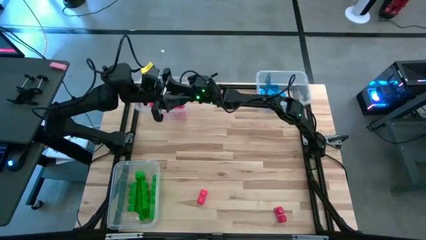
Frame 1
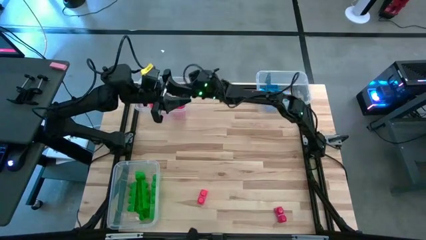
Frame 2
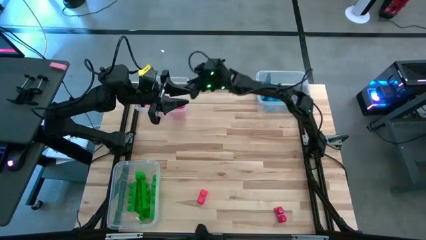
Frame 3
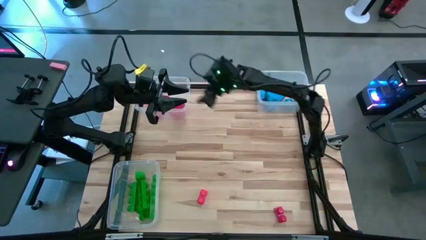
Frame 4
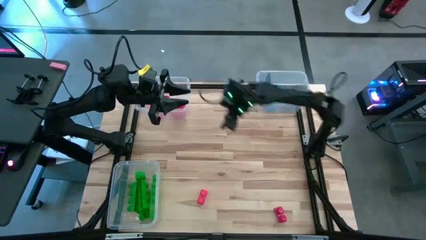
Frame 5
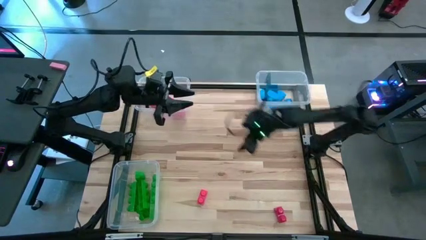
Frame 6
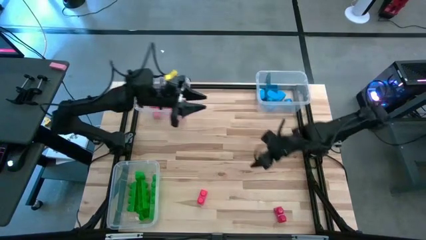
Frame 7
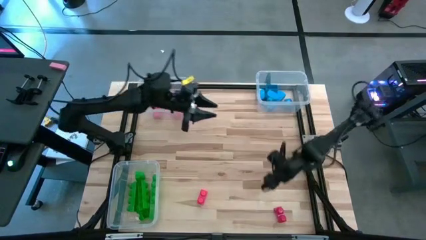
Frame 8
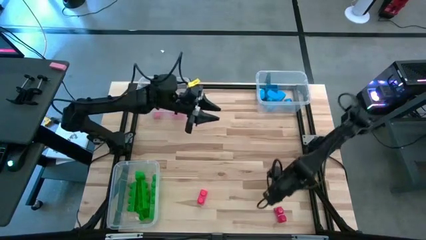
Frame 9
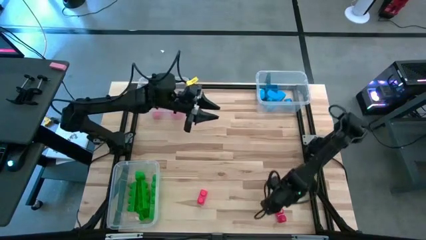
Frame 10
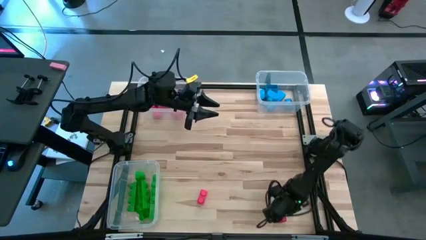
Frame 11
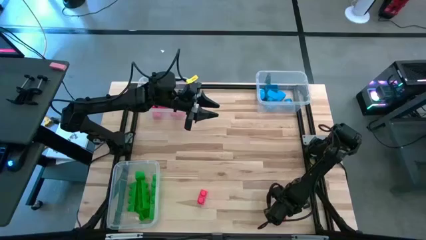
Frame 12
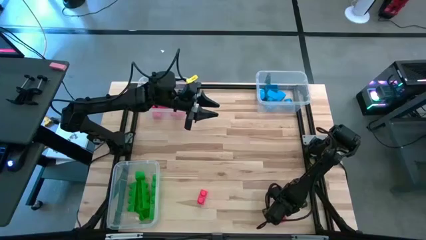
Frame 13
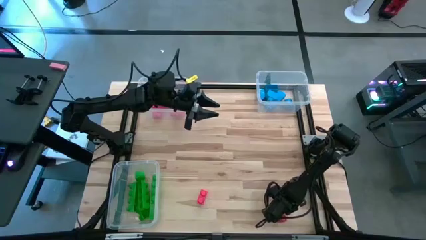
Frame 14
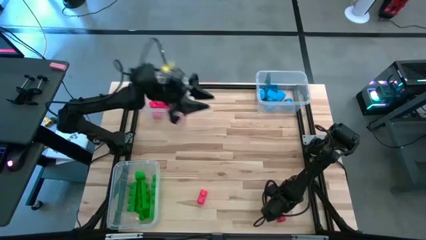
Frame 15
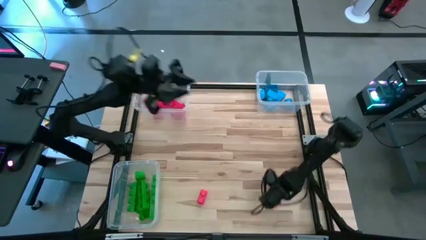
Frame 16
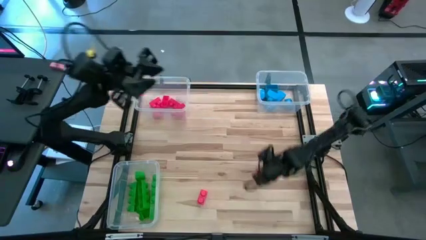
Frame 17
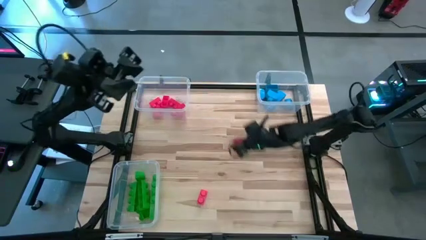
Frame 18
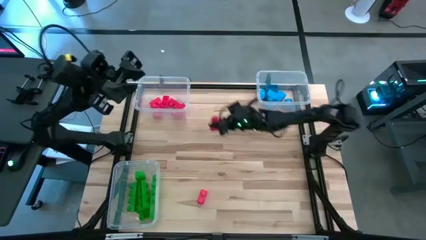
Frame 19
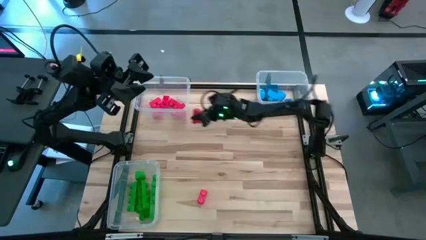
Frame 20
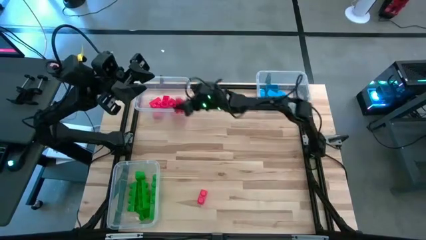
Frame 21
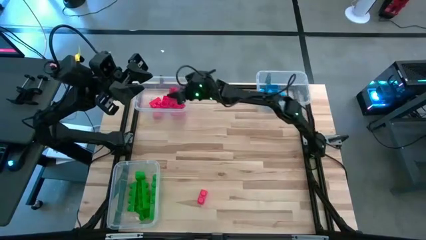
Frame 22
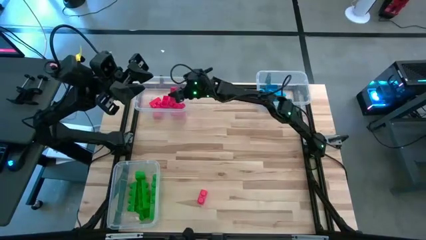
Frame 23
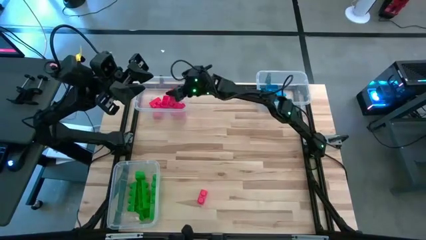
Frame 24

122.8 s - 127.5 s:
Task: Sort blocks
Put the red game piece into the top left transparent bin

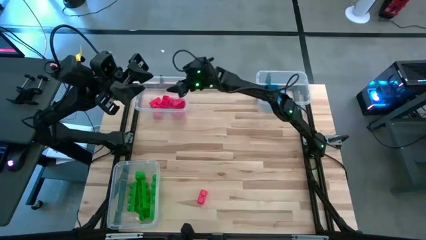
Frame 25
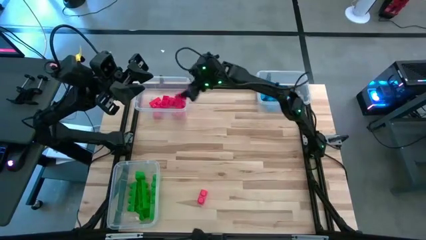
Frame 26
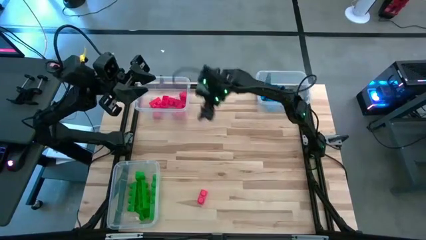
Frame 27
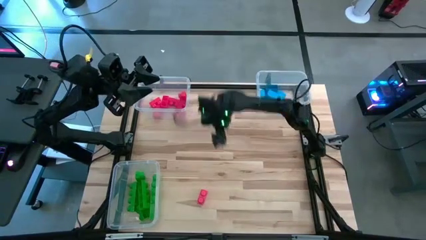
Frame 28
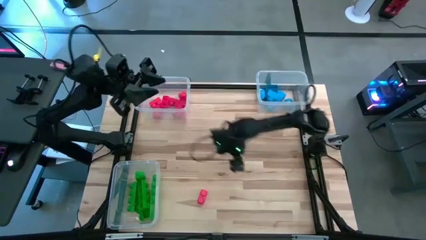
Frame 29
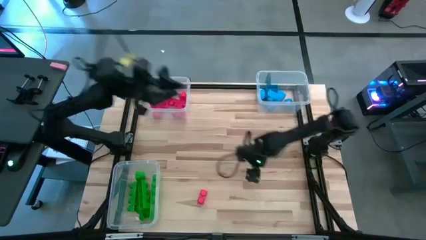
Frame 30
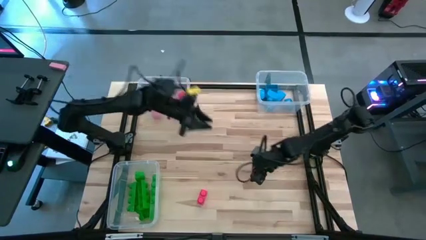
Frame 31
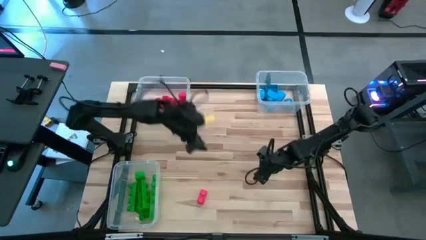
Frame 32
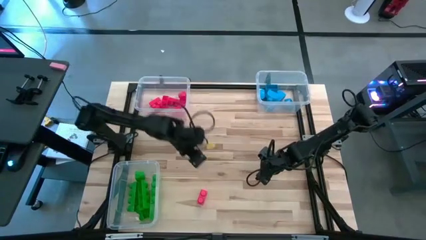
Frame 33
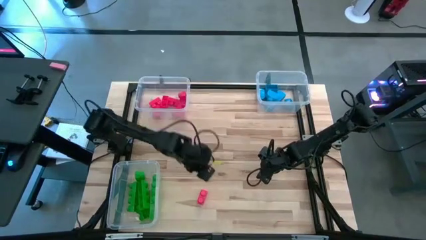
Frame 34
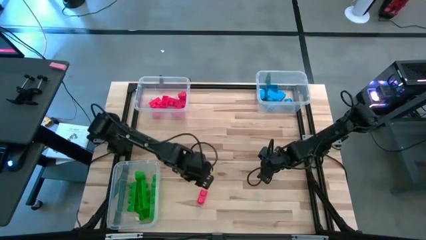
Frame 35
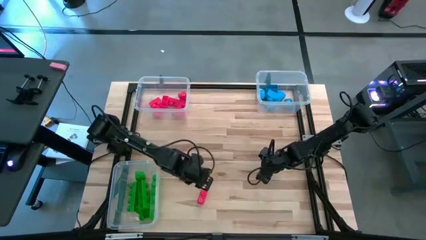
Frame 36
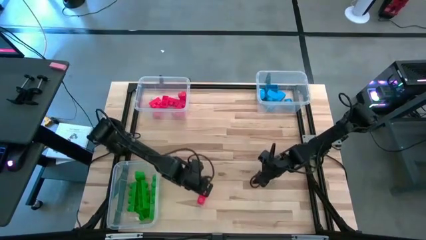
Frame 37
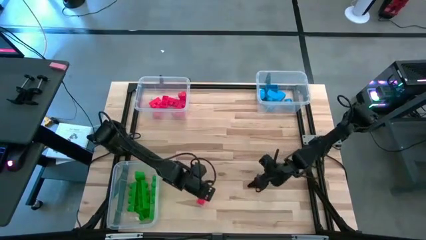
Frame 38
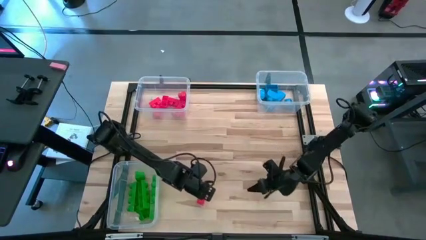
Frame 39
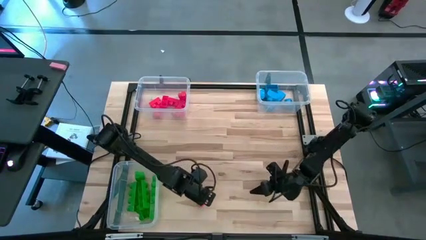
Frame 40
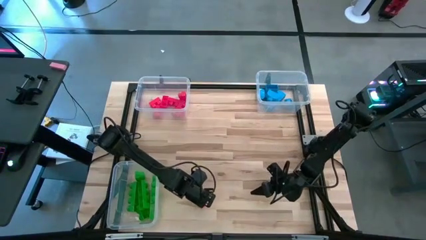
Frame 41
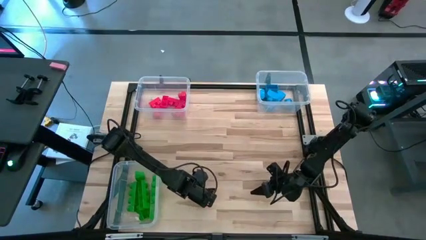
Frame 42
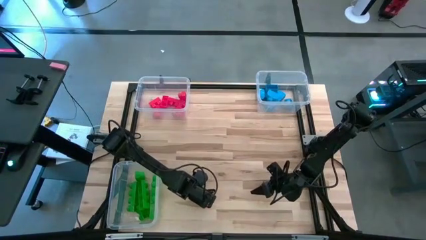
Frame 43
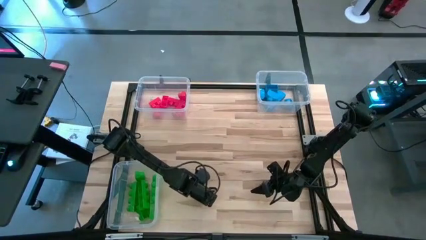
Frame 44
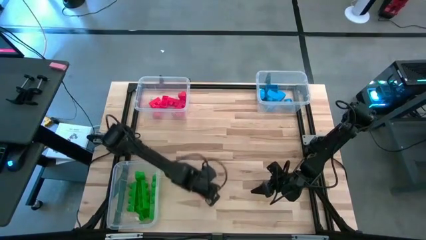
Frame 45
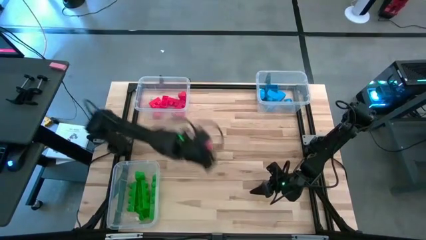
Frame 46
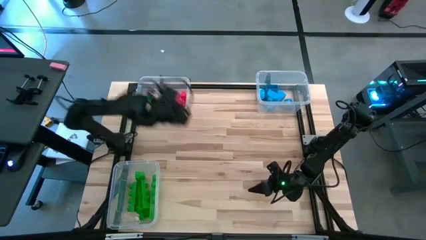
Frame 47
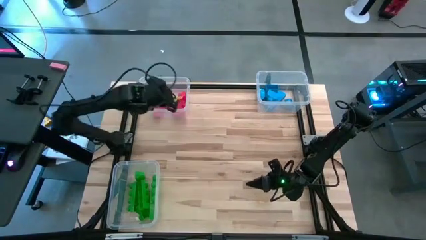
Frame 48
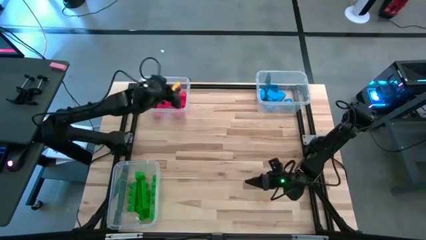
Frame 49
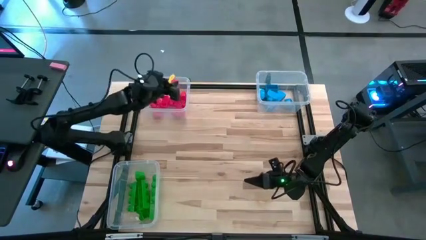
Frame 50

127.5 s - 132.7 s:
Put the red game piece into the top left transparent bin

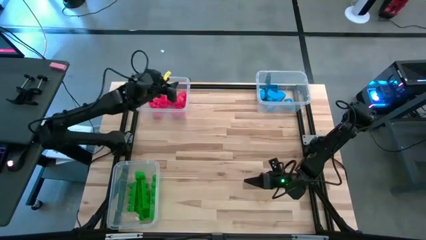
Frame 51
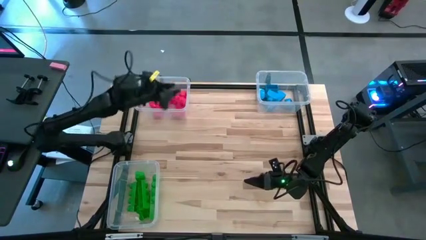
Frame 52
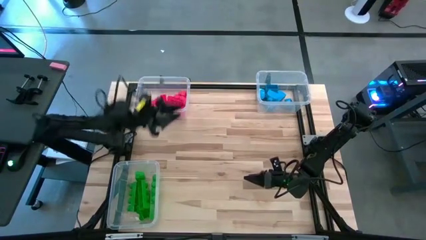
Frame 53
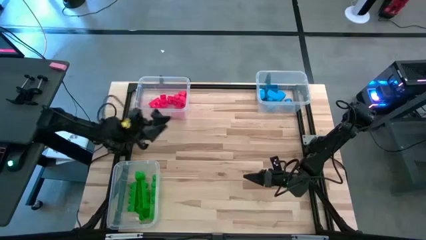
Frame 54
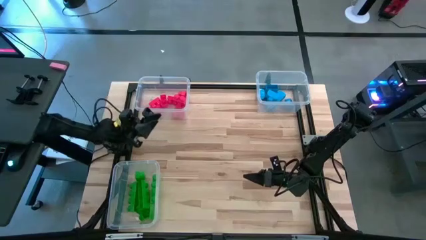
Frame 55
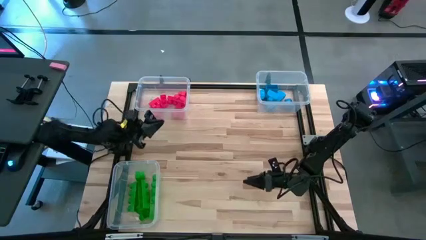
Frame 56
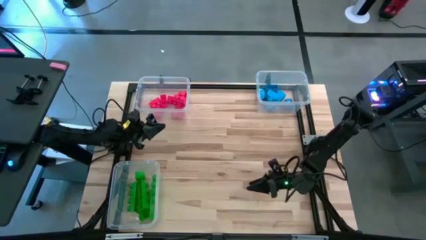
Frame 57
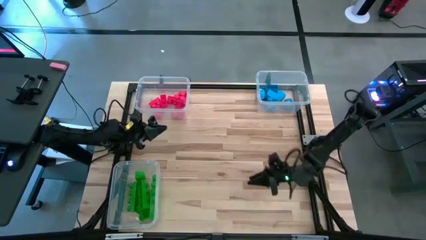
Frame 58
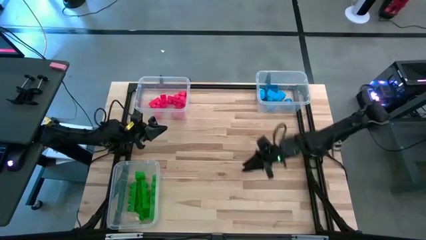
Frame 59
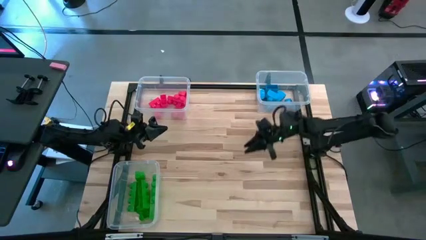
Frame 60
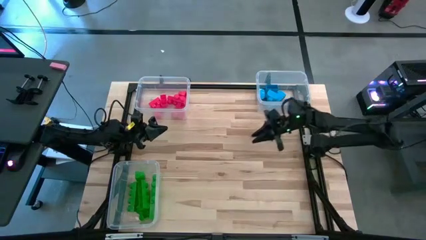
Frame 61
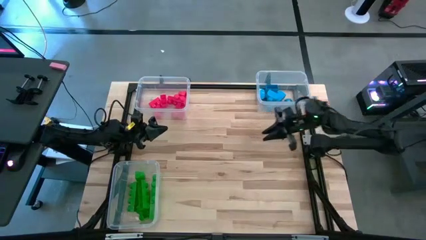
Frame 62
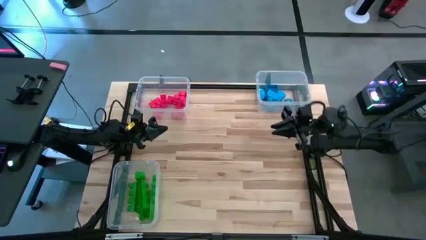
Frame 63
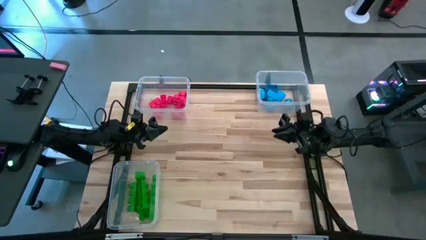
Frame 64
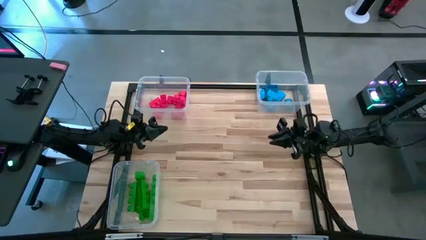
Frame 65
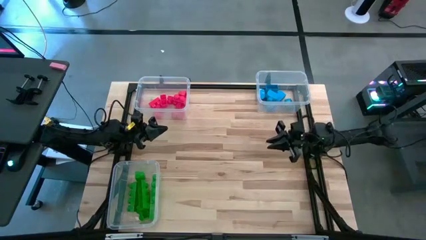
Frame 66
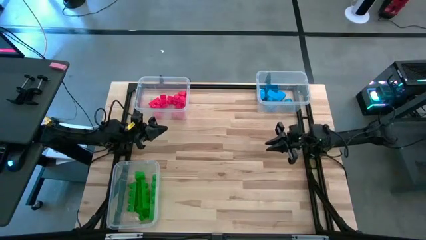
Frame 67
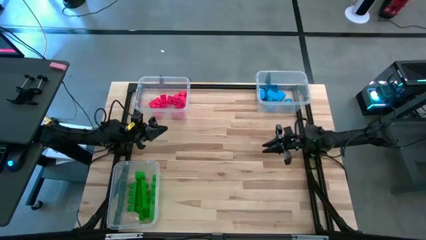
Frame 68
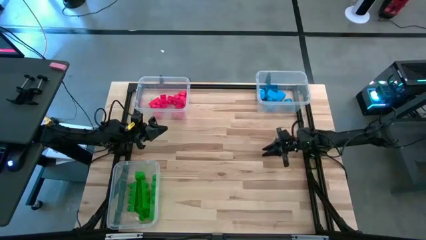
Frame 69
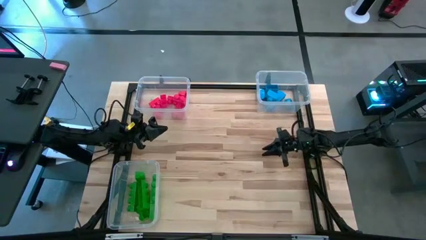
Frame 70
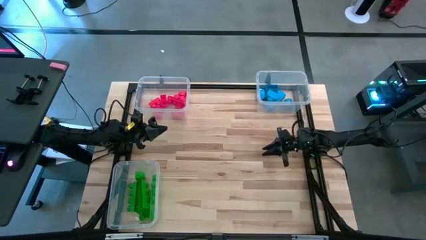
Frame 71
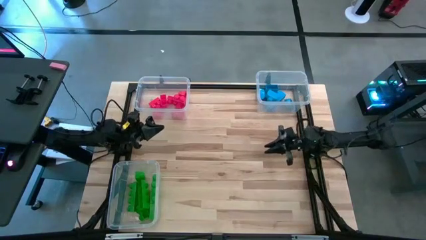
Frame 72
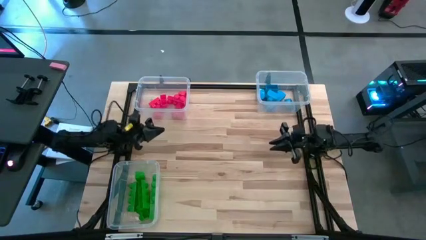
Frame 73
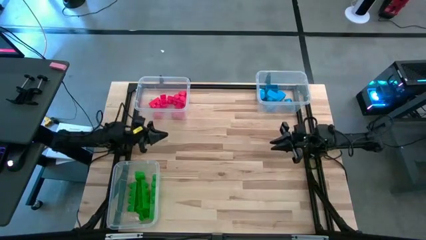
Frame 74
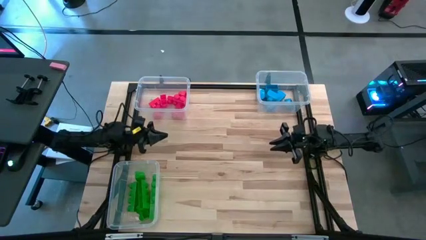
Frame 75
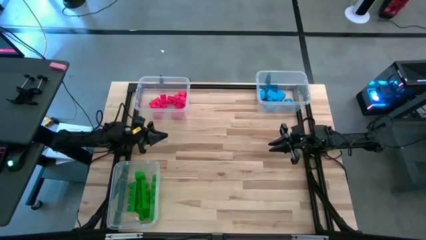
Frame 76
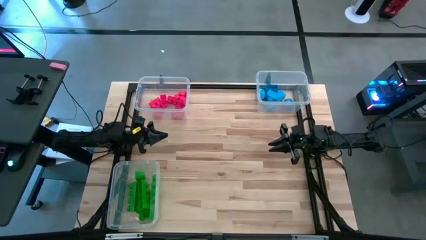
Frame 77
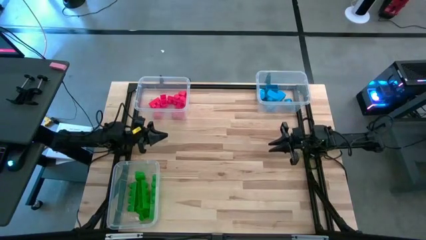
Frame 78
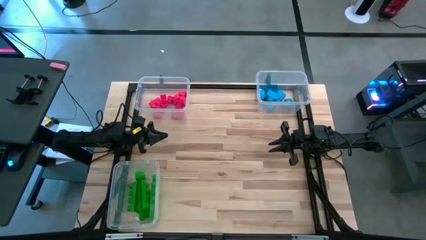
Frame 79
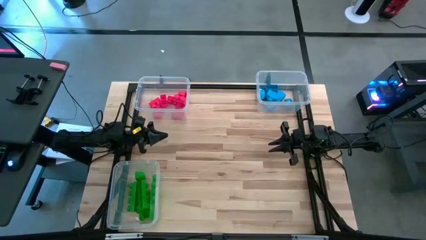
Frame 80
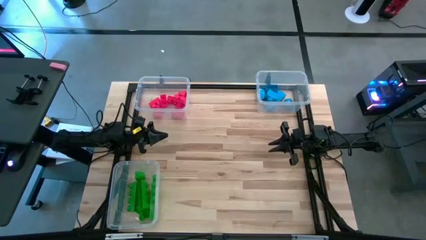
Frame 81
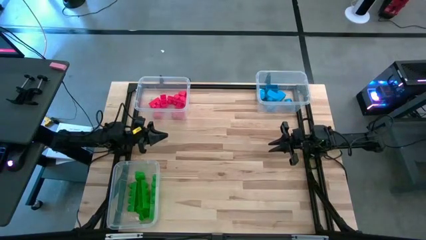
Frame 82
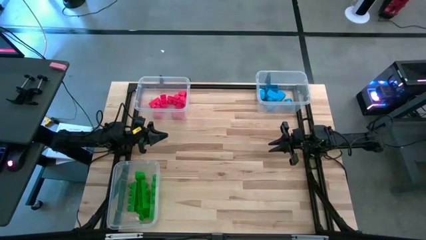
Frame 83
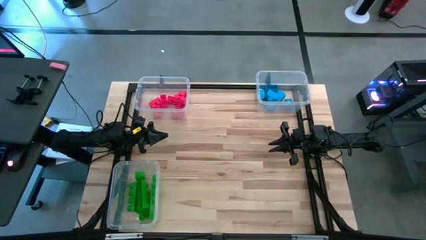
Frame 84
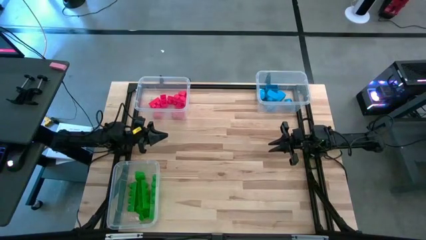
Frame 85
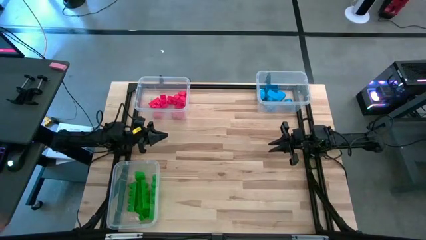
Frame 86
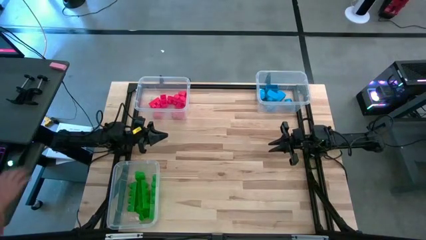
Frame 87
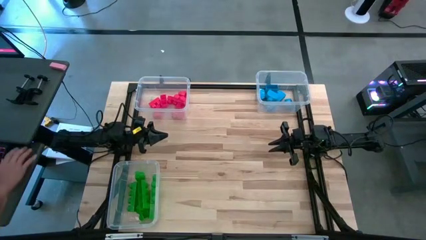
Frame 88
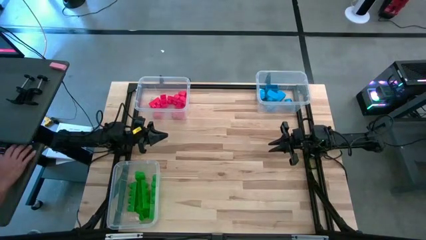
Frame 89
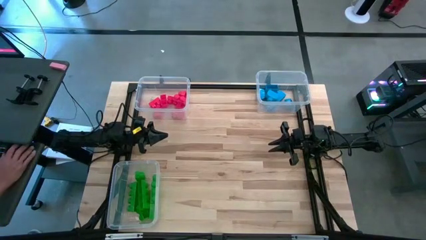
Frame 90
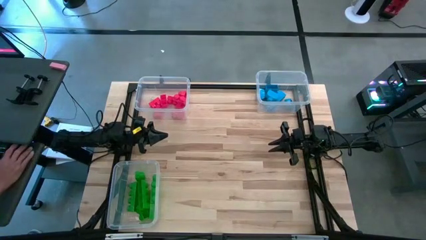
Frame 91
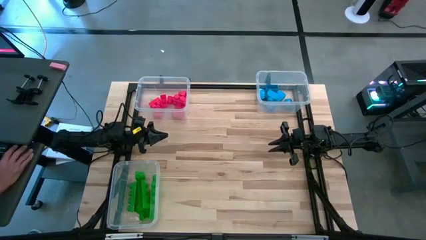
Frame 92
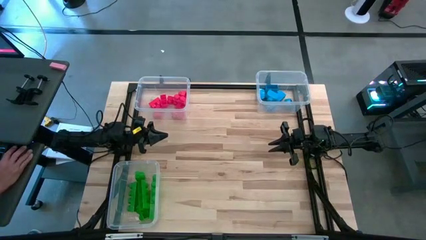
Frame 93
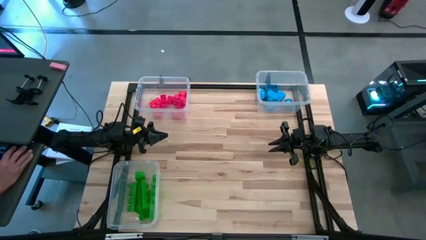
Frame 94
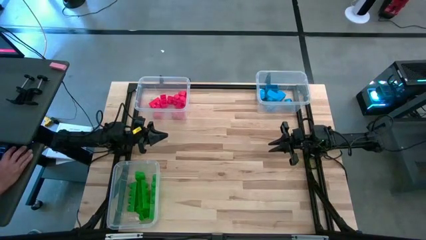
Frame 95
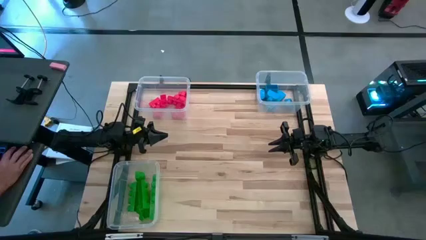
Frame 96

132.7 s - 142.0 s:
Return to home position
